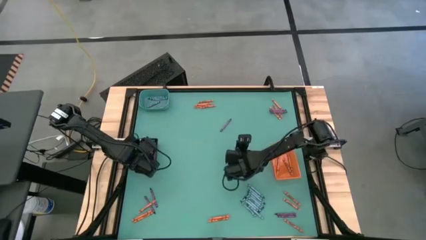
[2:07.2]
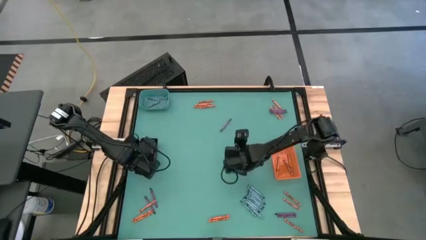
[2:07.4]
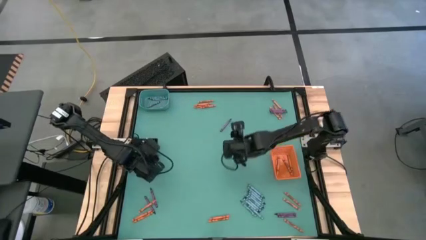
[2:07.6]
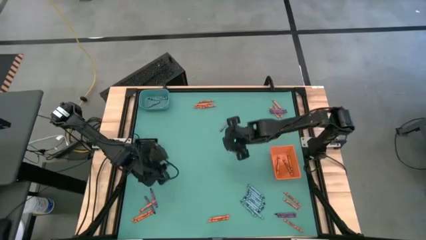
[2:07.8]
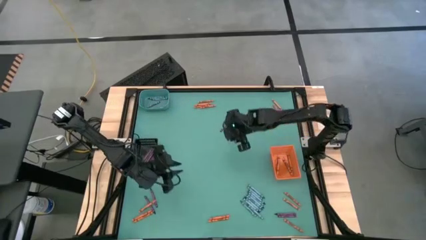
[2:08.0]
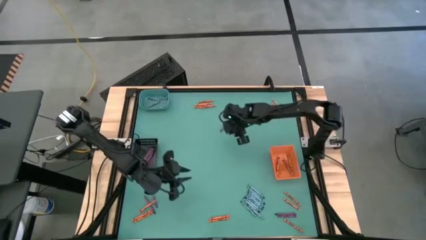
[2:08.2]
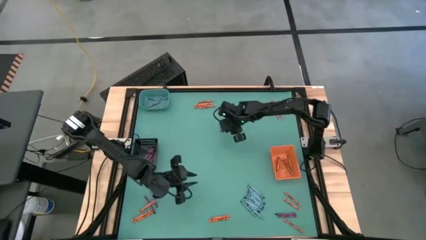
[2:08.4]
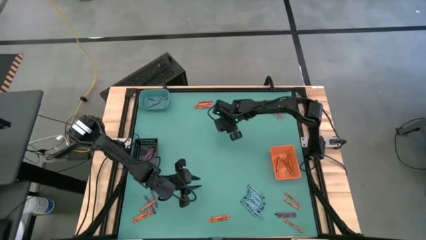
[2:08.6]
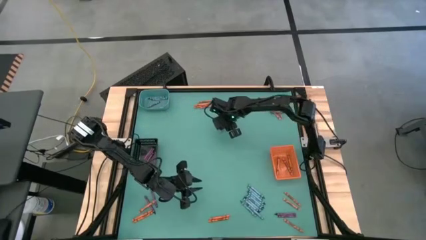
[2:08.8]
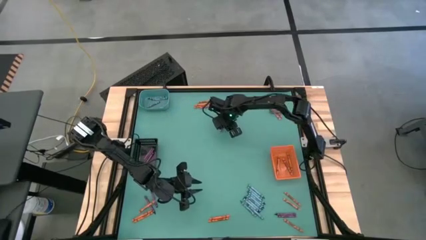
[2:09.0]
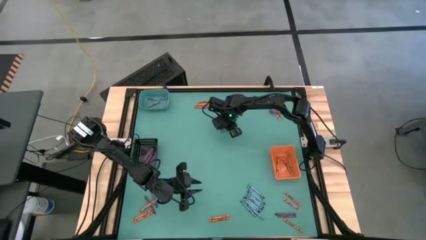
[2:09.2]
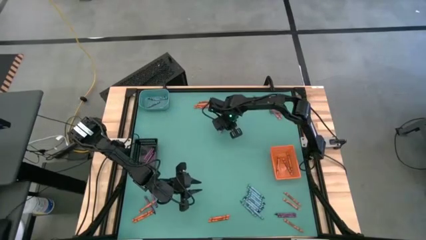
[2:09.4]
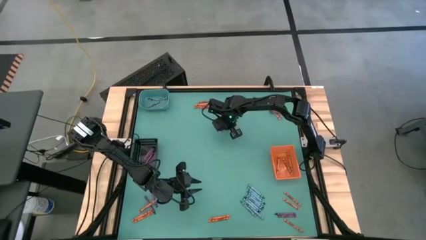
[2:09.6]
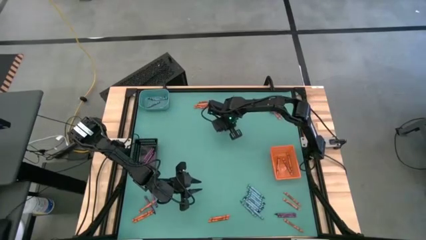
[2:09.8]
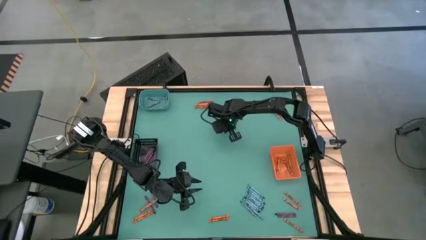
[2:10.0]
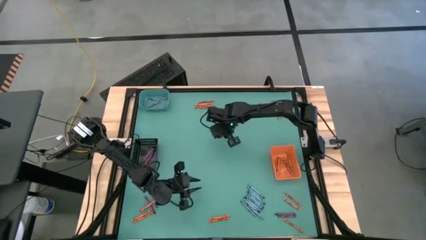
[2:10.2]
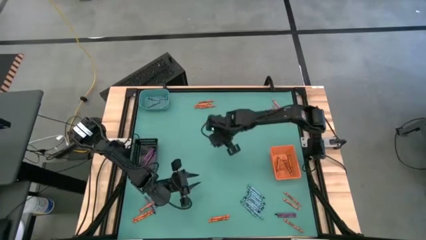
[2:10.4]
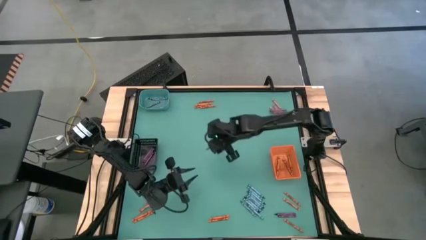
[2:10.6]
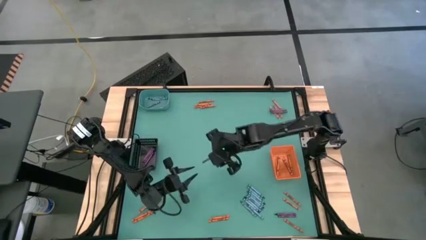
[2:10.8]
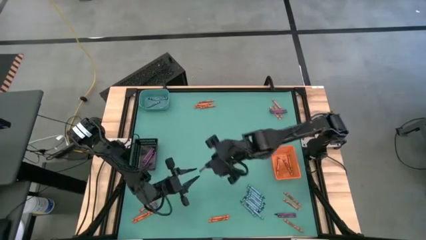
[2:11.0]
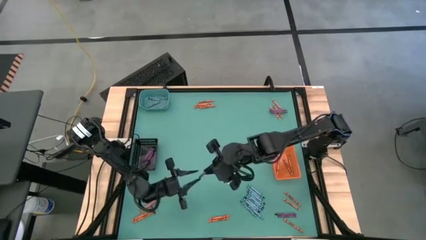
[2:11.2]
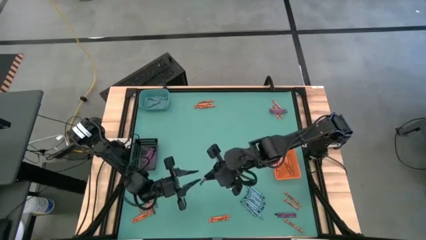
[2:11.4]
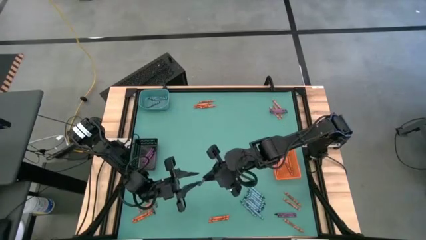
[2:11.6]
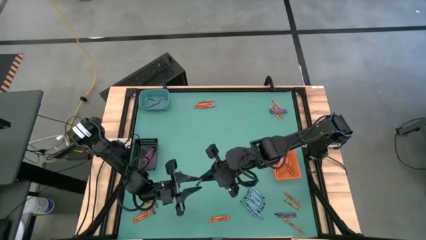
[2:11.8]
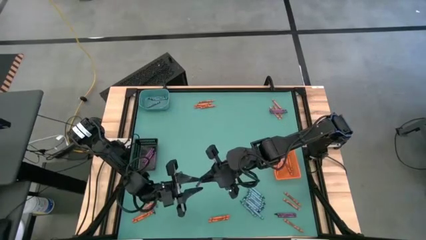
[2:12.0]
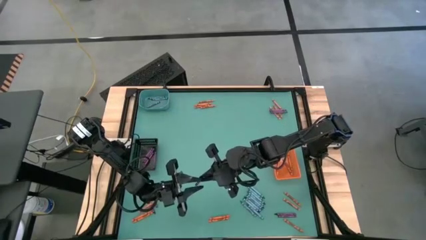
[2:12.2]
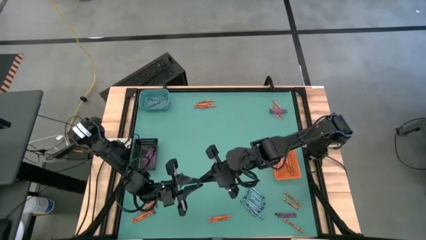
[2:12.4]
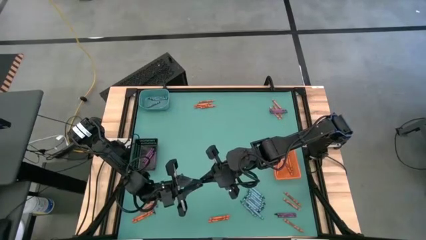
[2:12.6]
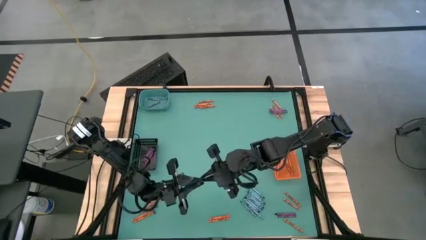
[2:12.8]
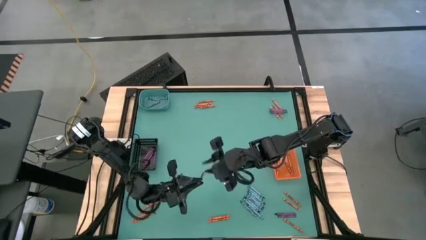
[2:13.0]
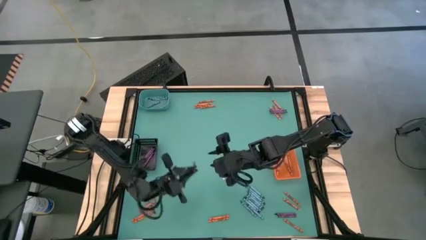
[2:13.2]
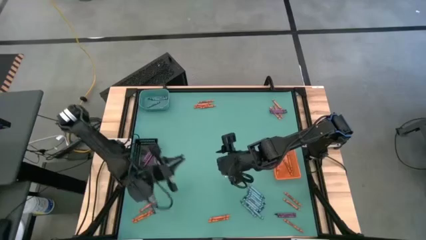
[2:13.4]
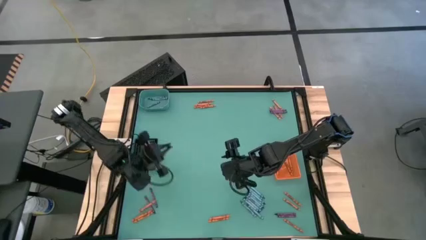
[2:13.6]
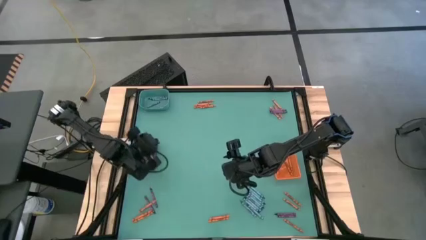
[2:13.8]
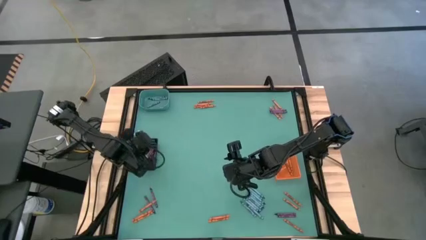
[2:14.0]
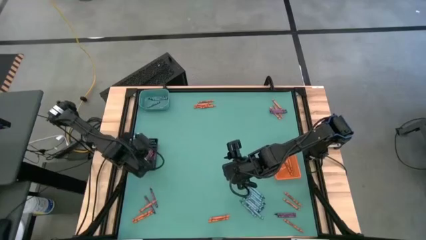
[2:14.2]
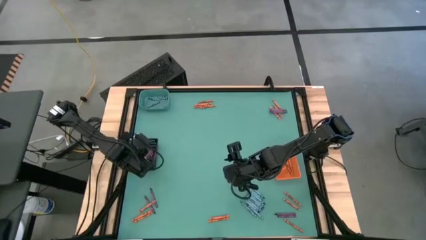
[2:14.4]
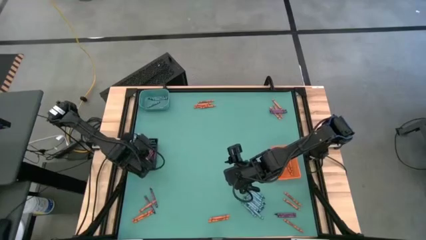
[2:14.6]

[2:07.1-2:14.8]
Task: Sort crayons
Put the purple crayon into the black bin

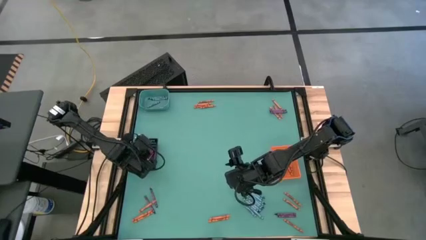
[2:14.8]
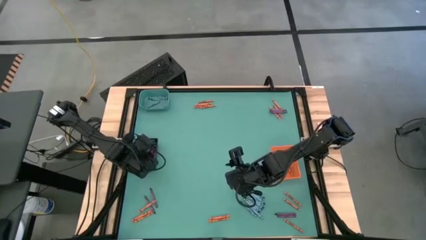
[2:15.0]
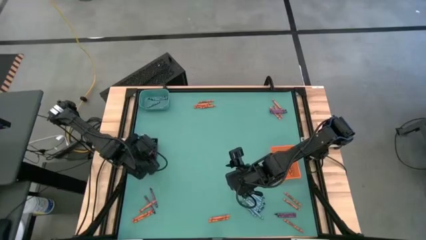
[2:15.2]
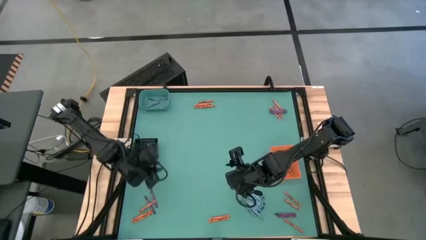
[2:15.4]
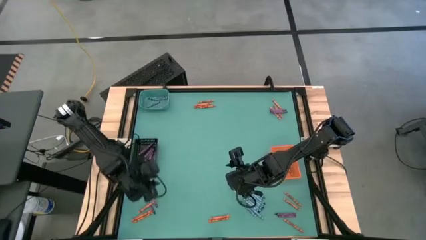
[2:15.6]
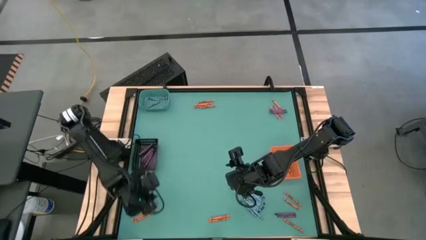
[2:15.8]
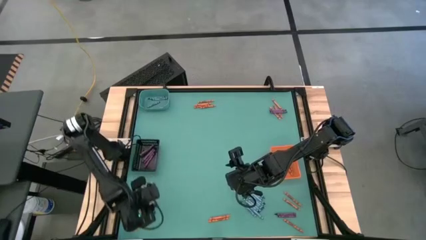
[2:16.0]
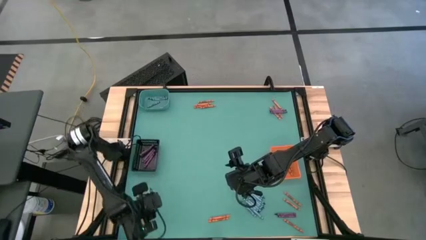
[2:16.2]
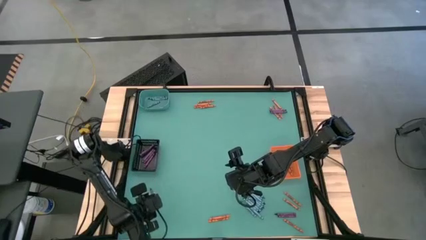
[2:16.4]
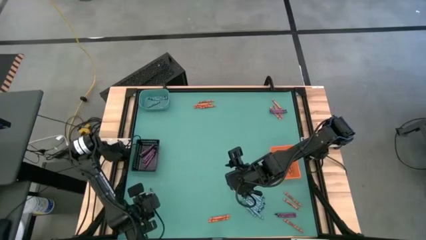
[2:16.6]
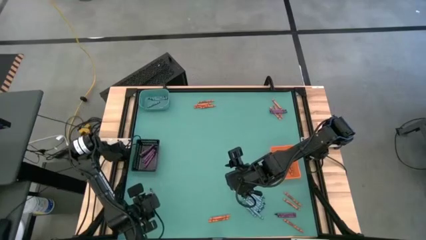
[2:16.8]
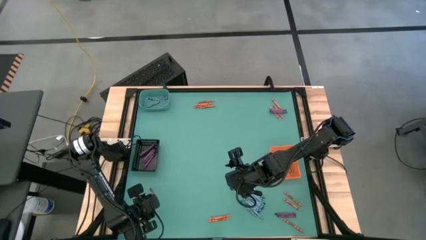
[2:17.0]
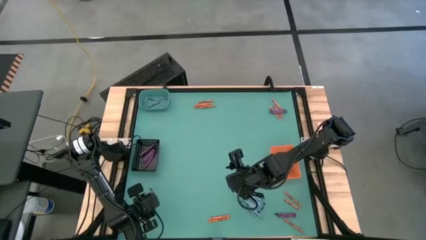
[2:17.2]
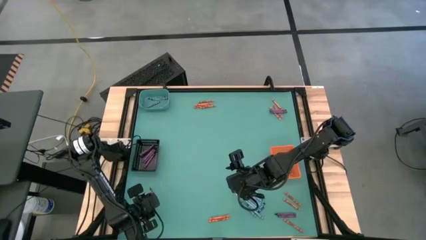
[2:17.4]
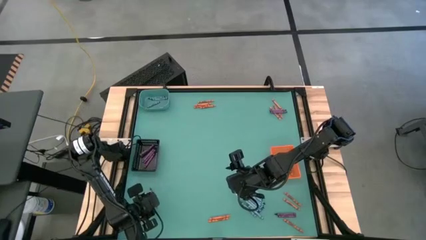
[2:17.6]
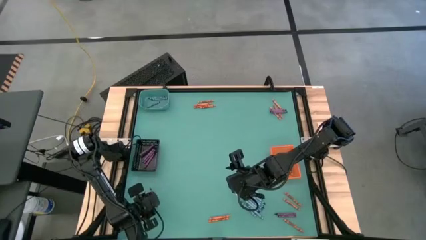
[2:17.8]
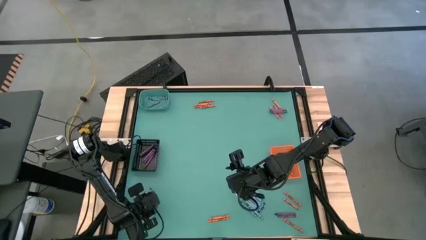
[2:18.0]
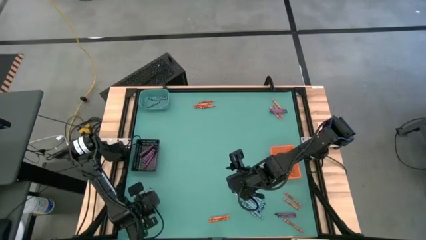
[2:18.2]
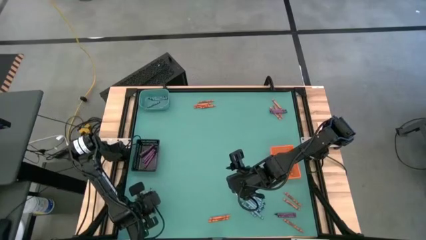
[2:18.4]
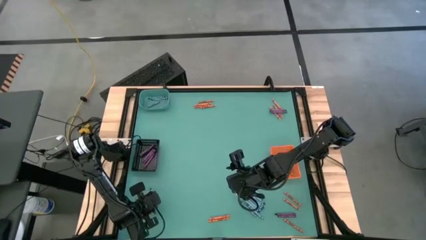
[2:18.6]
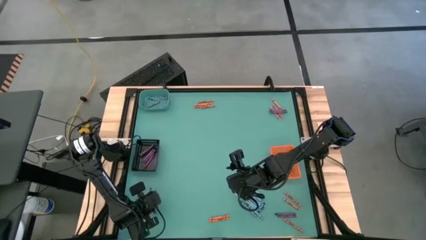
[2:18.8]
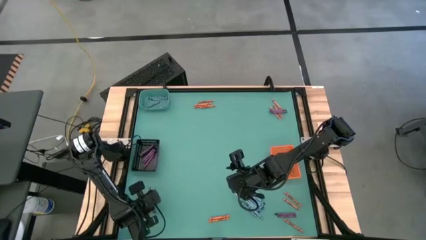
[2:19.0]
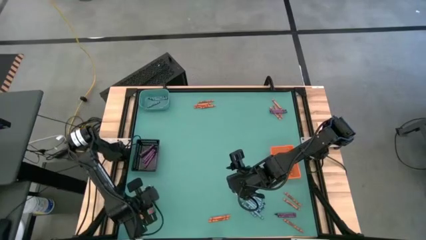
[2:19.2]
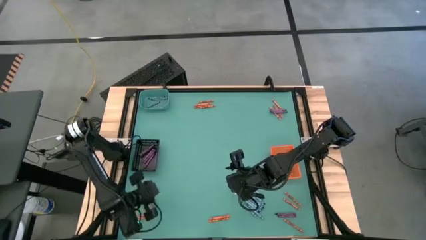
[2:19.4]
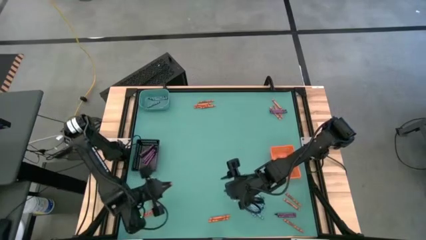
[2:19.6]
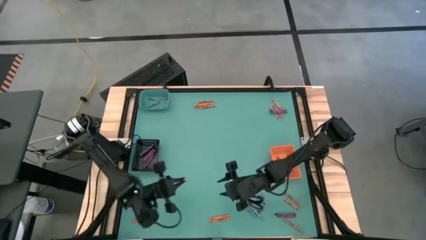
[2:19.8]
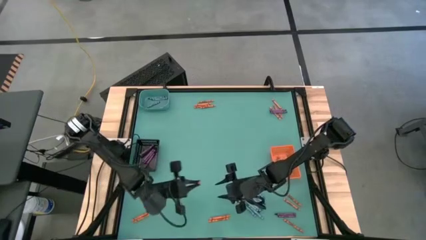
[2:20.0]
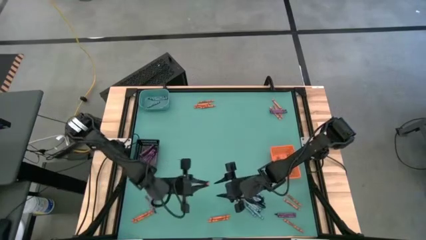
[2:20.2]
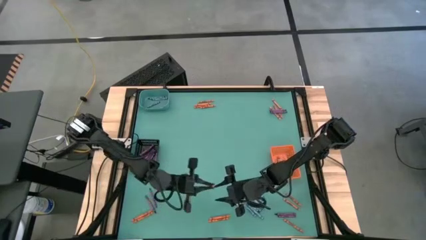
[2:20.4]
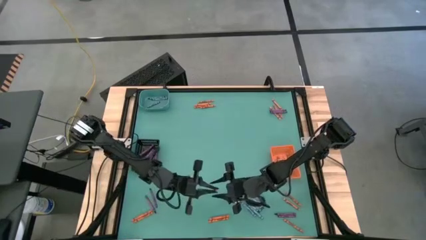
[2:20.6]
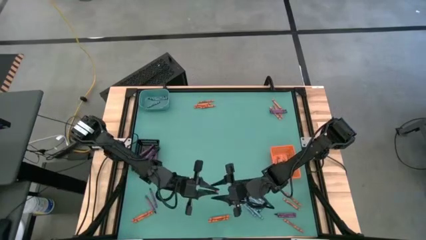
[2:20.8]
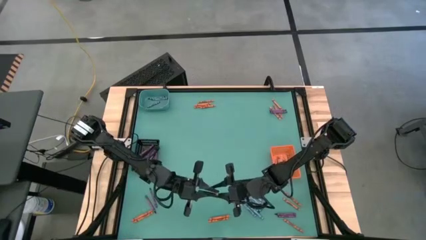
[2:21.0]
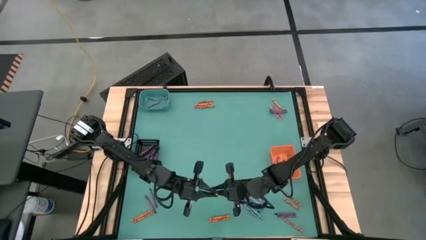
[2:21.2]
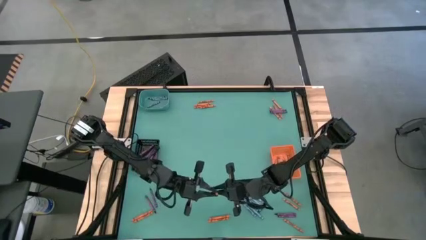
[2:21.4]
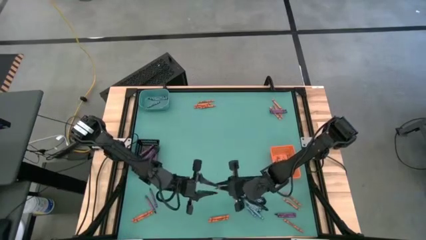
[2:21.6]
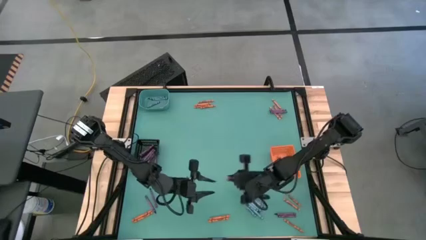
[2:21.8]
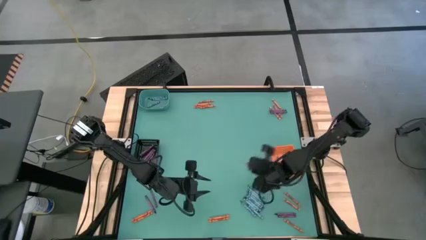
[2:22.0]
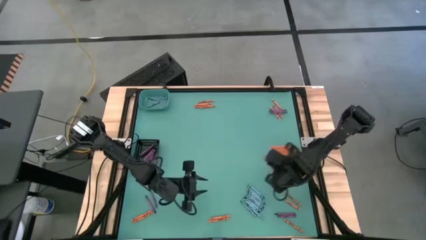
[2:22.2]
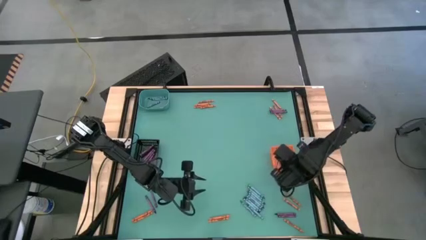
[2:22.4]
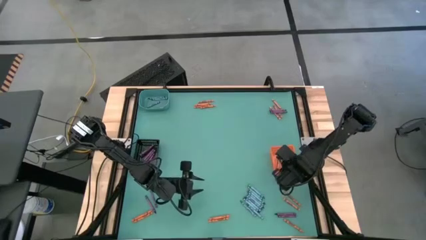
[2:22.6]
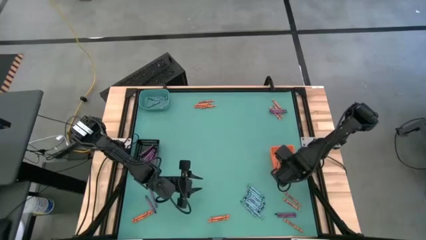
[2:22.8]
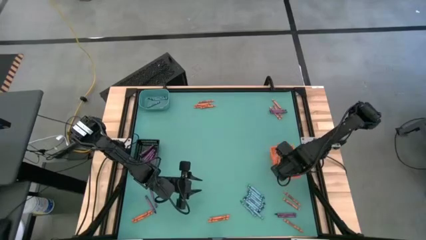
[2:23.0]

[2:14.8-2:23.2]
Put the orange crayon into the orange bin
